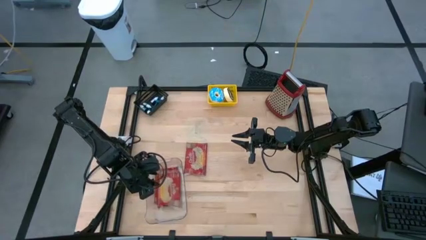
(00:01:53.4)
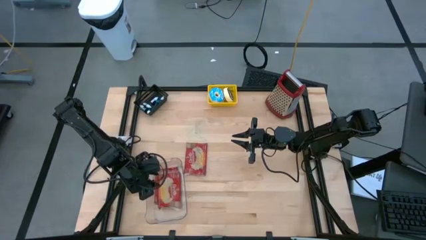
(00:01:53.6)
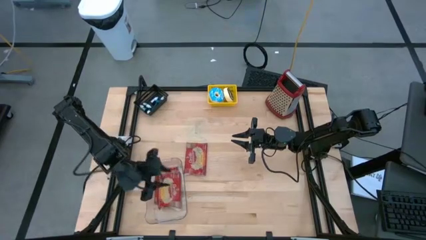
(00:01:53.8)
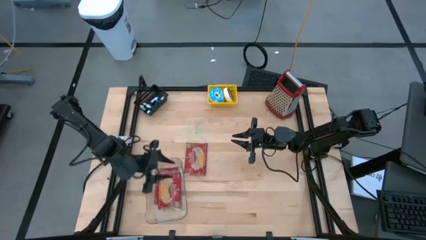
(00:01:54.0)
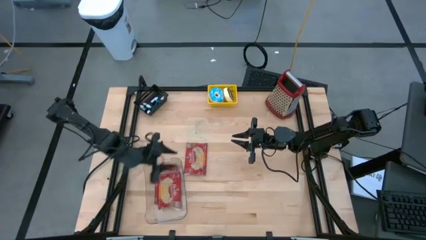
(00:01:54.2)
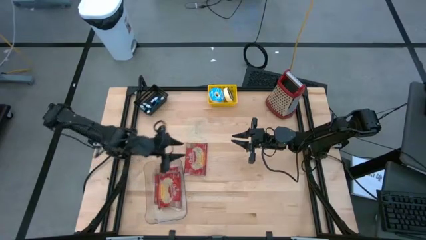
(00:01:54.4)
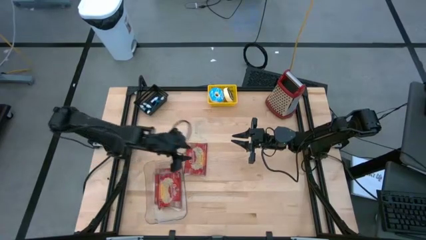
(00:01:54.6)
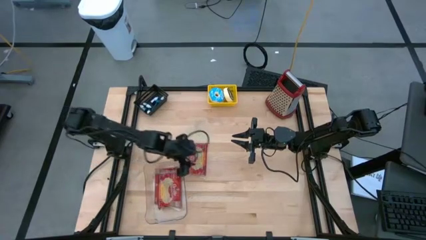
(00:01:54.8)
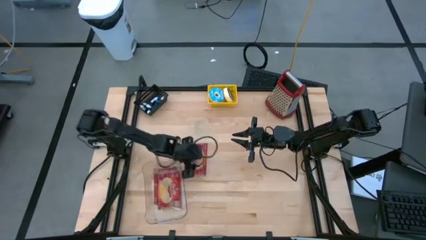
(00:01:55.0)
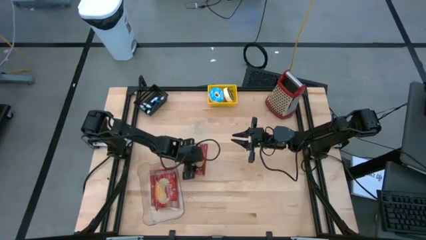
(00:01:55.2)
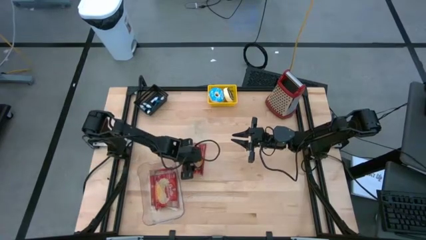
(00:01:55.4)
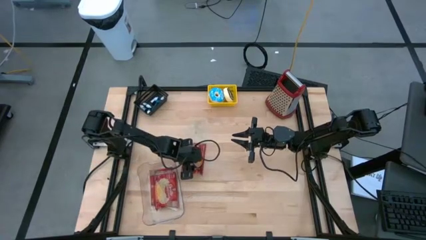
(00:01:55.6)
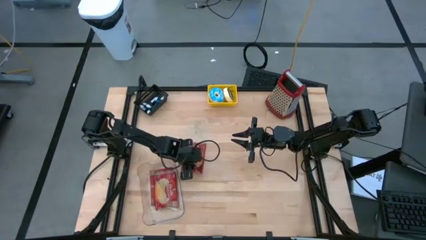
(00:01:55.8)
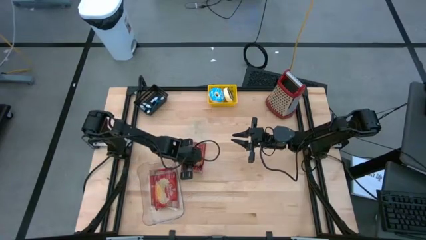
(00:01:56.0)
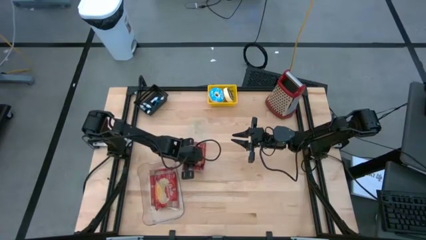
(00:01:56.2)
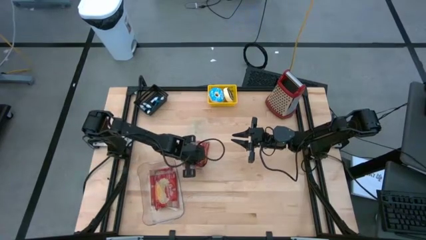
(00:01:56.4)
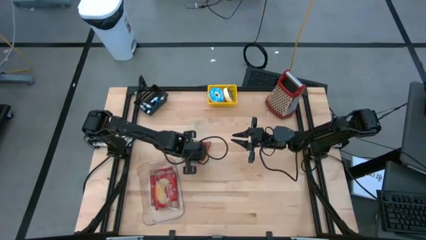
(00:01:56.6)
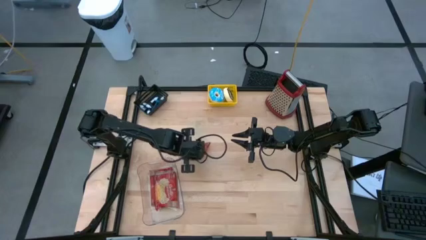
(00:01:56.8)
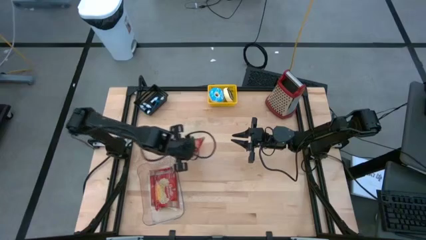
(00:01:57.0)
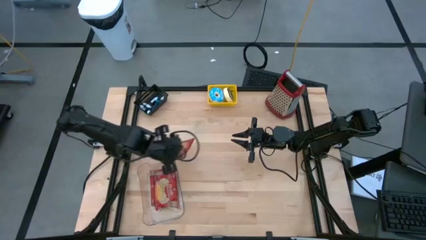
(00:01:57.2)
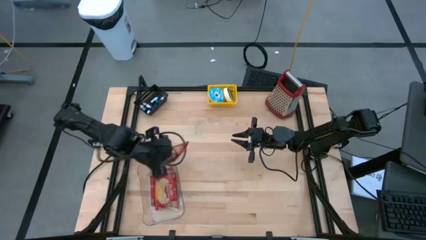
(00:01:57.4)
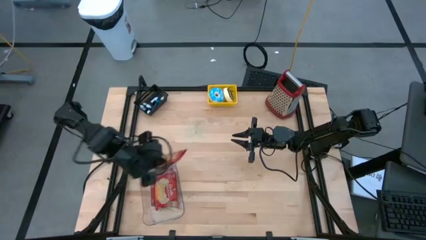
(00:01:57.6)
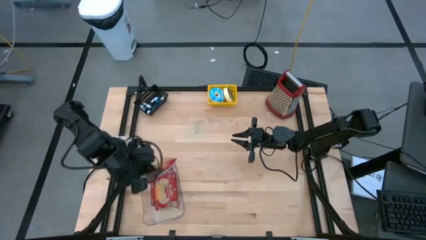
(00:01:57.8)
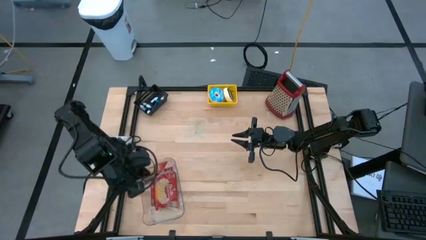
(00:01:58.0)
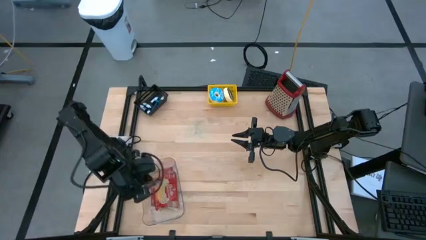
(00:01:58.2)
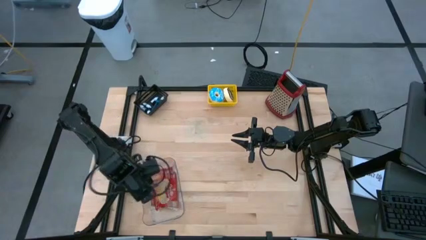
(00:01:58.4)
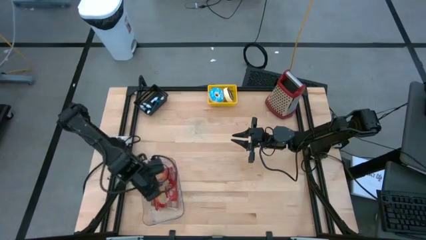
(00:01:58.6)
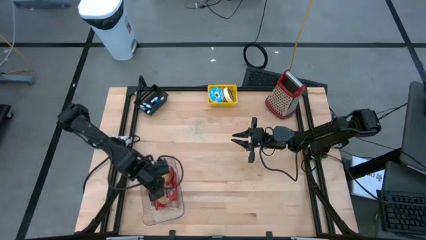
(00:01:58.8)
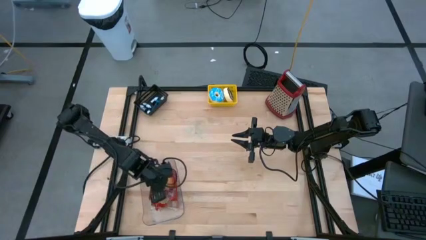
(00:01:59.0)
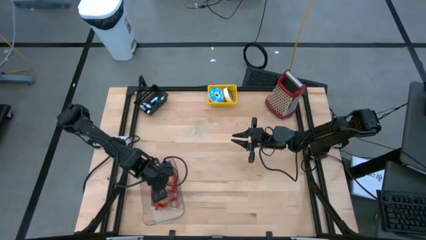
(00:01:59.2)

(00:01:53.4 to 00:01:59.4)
Put the red popcorn bag into the transparent bin

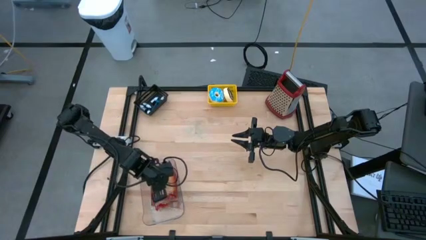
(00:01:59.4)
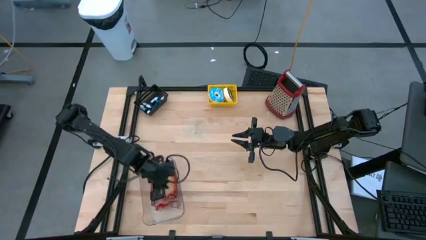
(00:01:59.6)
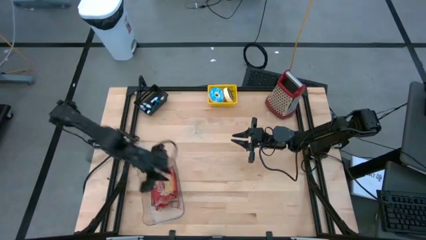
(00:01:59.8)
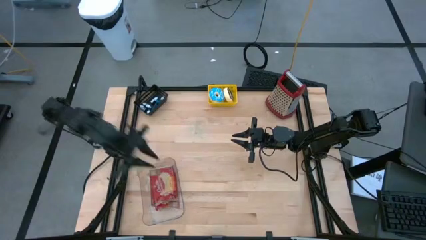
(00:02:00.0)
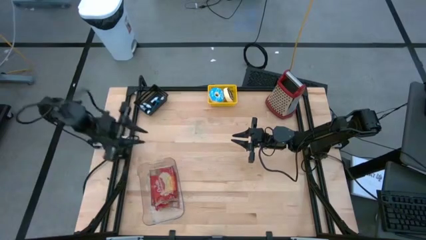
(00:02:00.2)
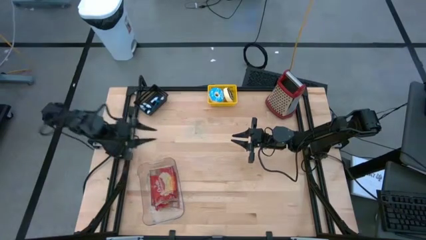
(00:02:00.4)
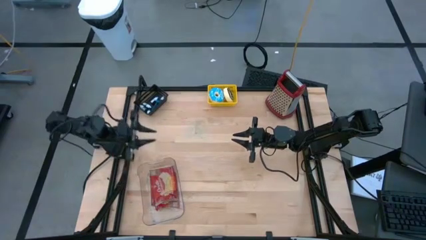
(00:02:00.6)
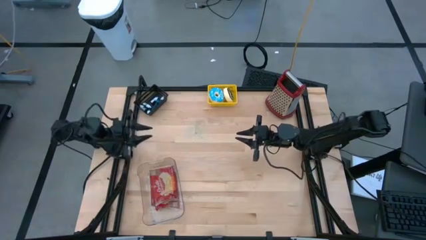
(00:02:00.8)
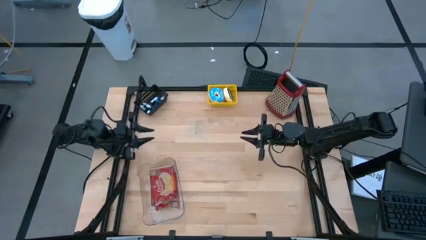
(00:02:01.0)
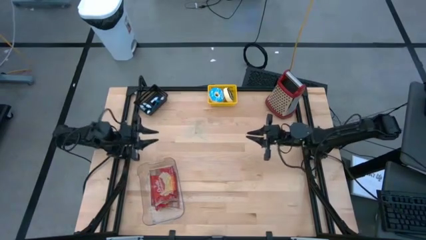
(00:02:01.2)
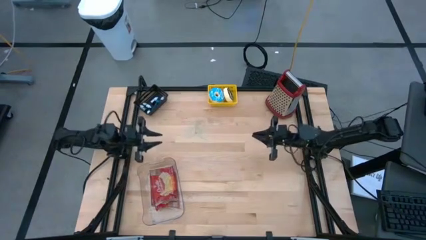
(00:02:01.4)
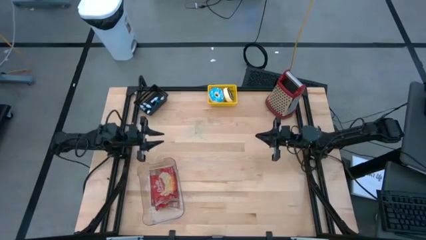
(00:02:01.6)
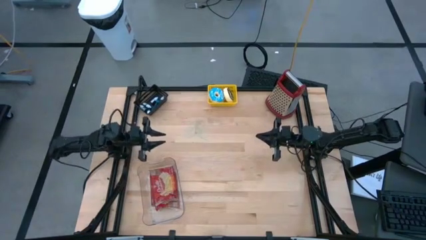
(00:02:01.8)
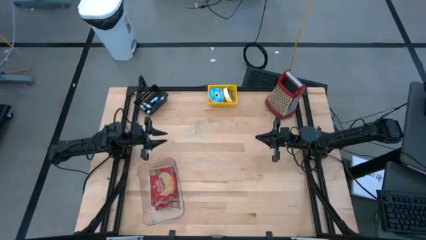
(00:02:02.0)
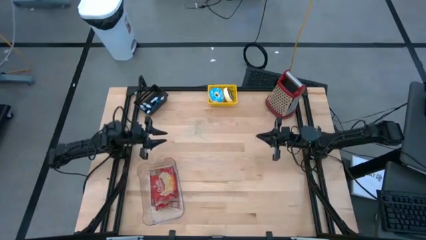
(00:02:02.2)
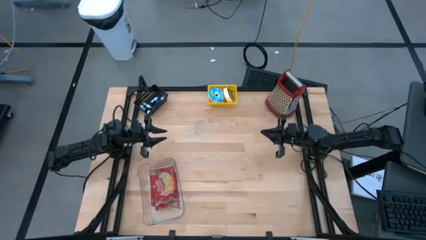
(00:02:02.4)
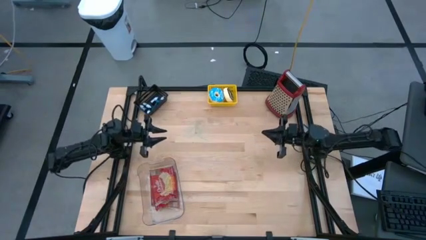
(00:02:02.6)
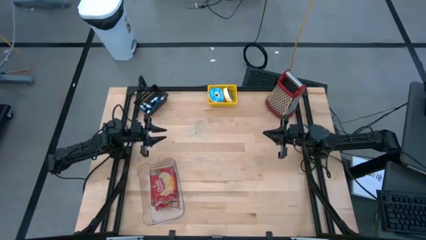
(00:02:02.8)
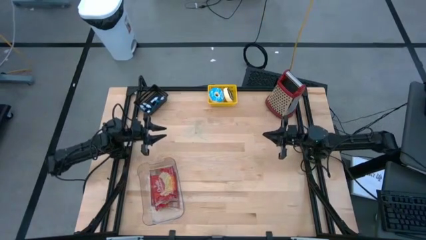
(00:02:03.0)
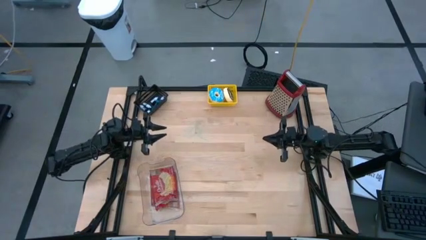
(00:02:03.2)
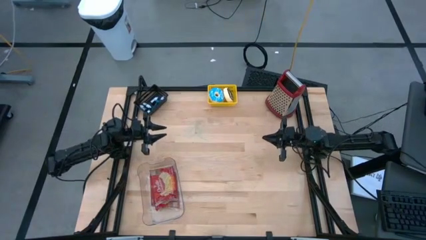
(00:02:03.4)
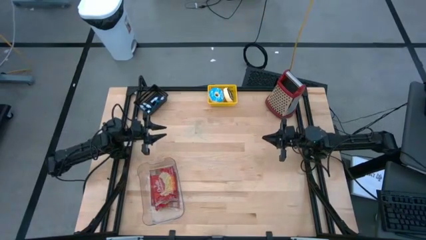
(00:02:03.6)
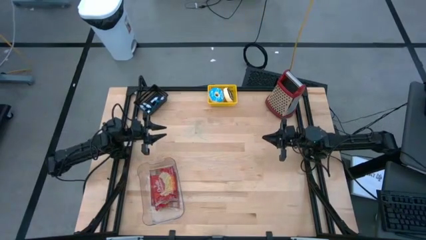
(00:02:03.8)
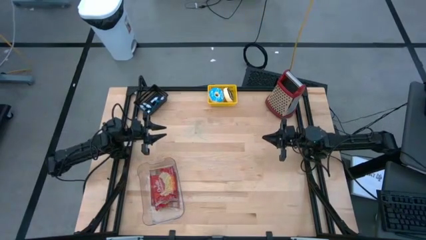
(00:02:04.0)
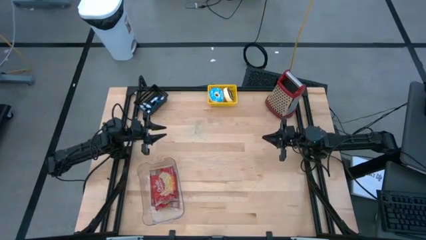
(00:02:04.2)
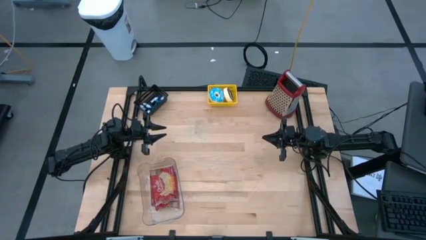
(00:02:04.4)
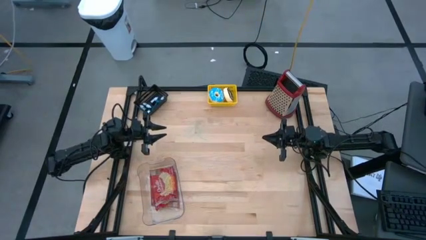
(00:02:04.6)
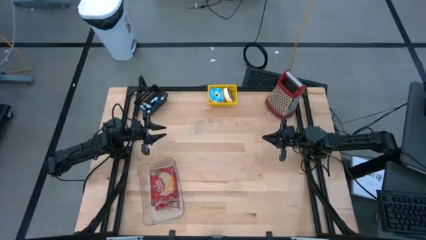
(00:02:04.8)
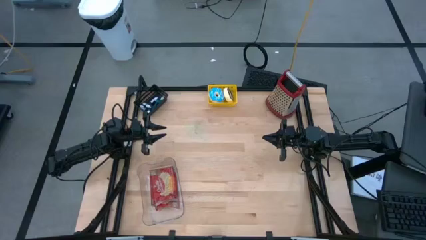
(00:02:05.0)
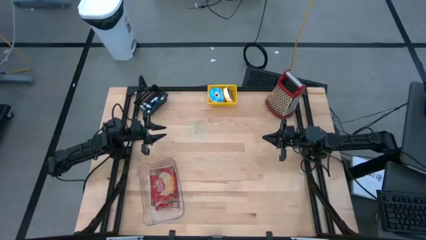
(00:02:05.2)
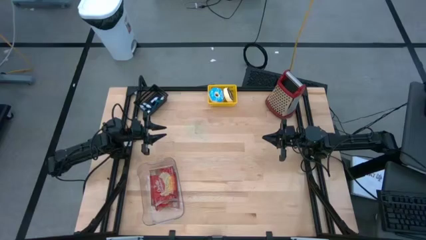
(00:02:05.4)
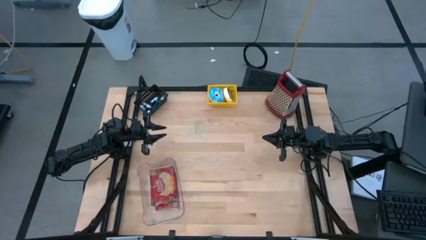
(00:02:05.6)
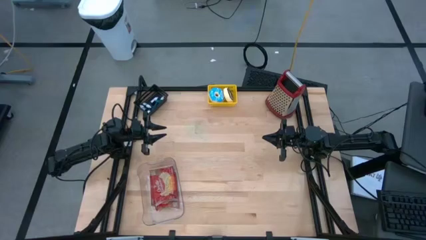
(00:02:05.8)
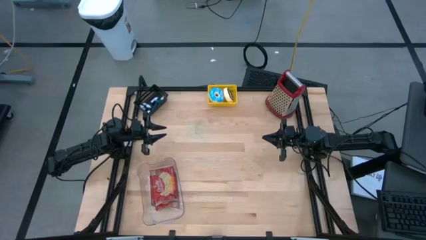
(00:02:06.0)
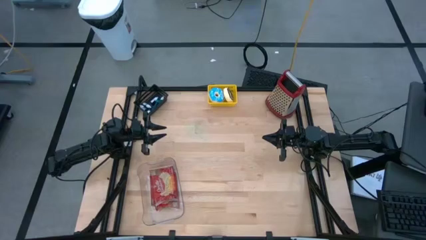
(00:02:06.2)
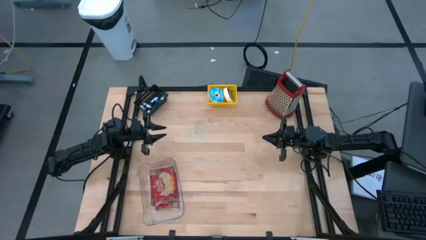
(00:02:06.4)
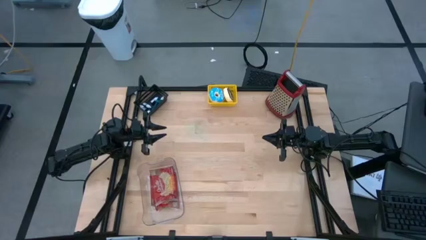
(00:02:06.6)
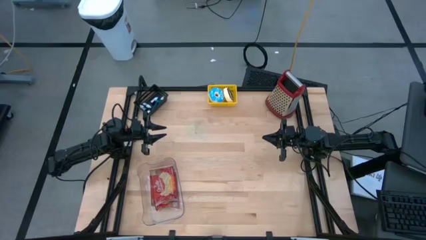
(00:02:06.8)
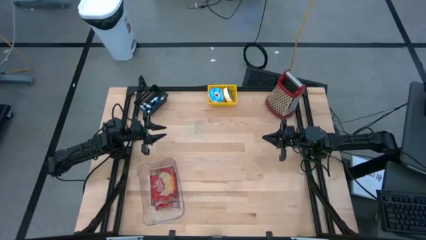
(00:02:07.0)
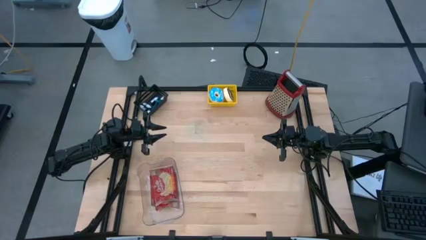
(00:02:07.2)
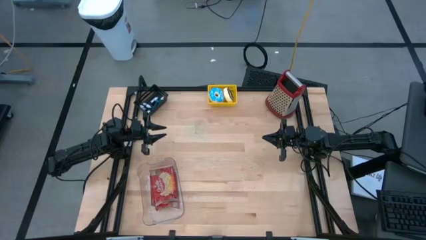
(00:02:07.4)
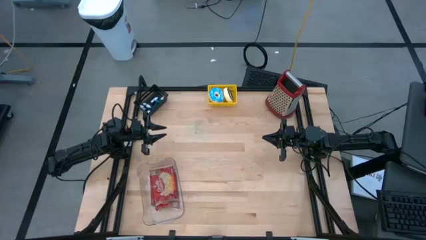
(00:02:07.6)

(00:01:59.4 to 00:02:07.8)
Return to Home Position
